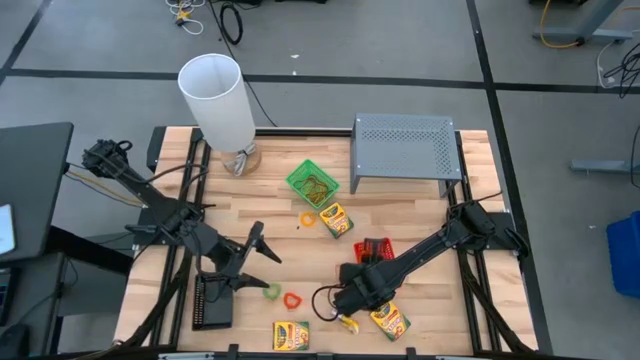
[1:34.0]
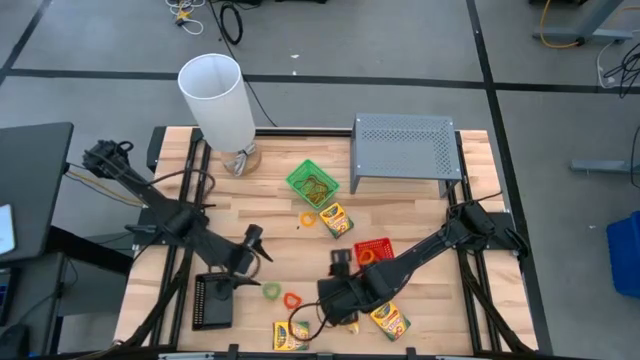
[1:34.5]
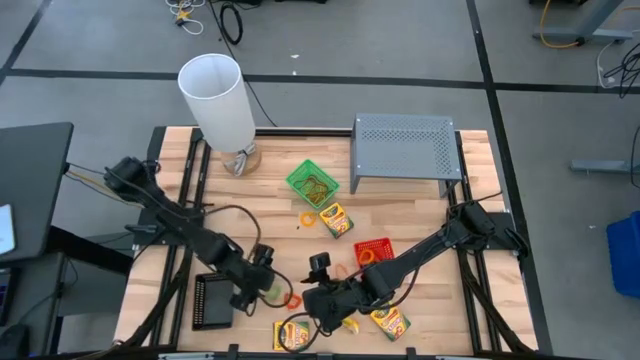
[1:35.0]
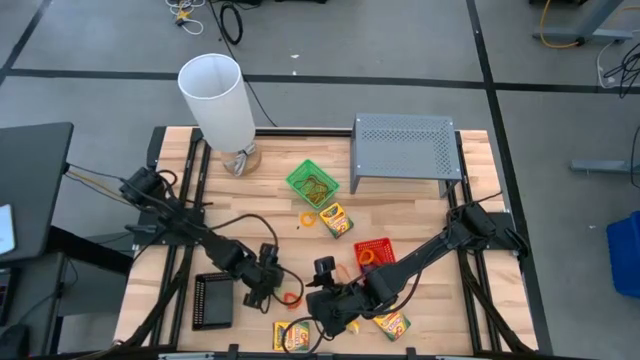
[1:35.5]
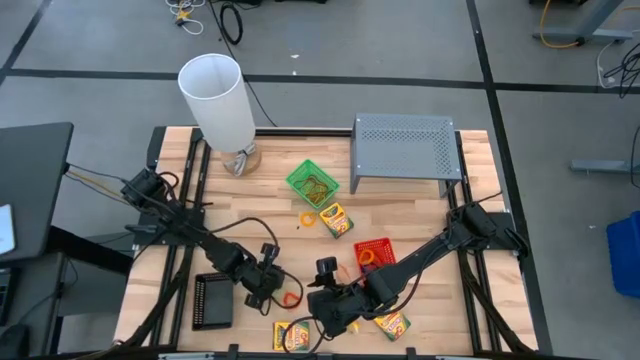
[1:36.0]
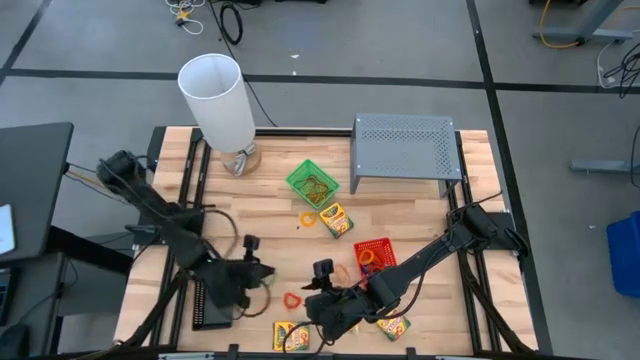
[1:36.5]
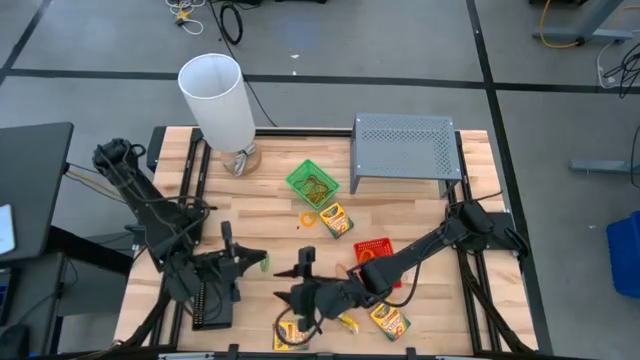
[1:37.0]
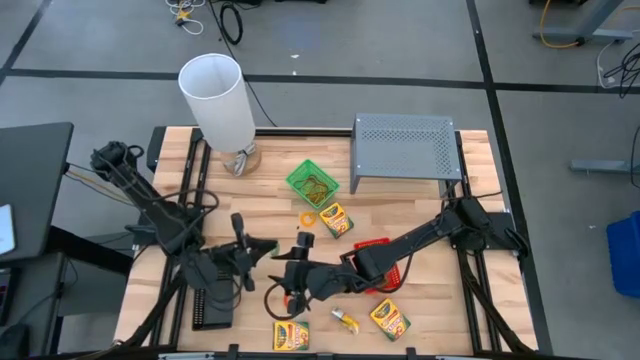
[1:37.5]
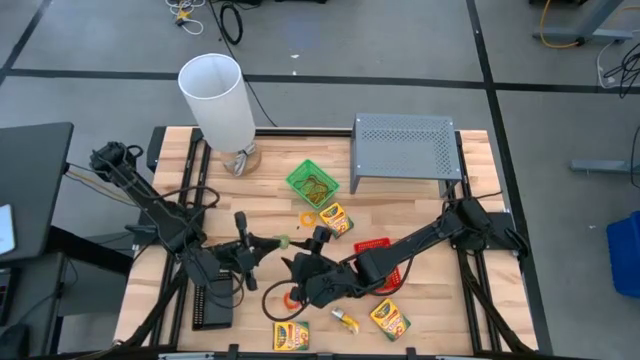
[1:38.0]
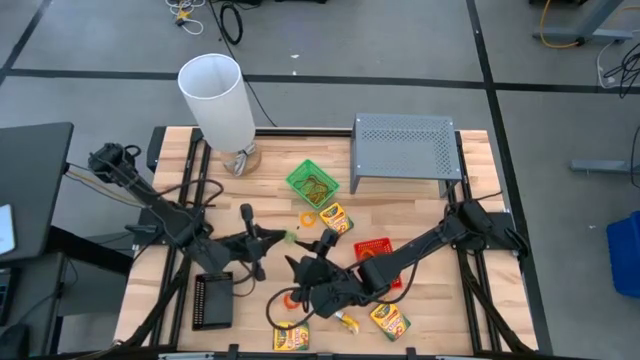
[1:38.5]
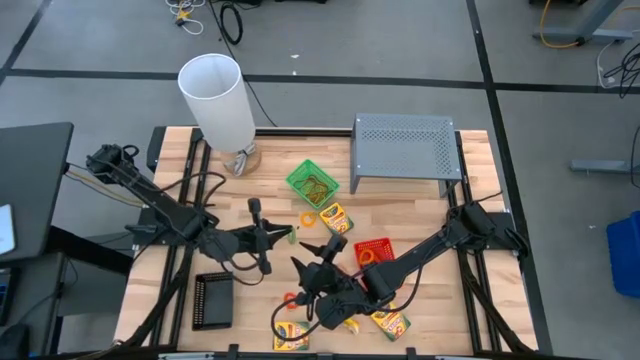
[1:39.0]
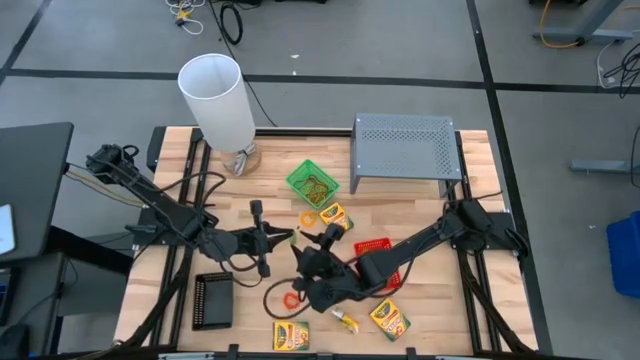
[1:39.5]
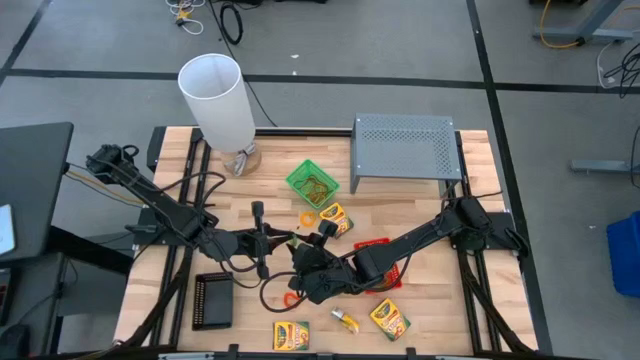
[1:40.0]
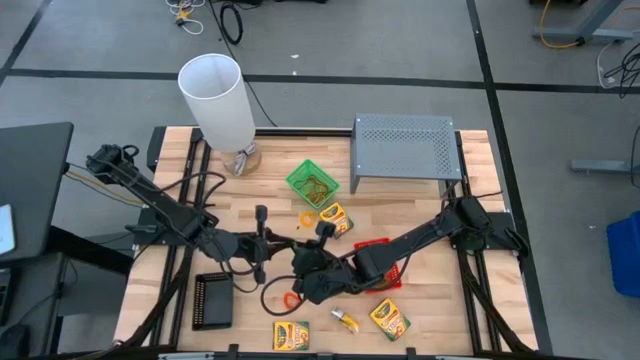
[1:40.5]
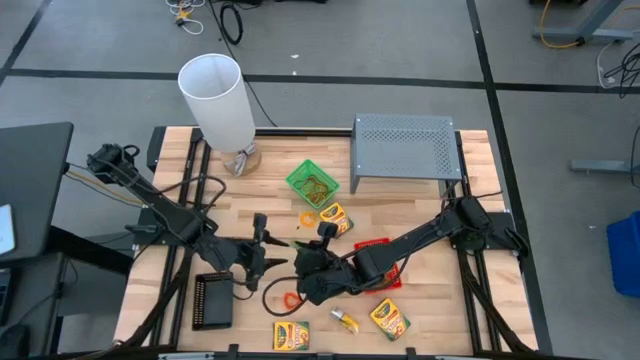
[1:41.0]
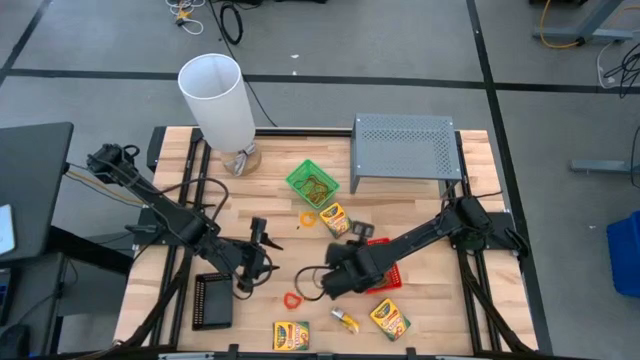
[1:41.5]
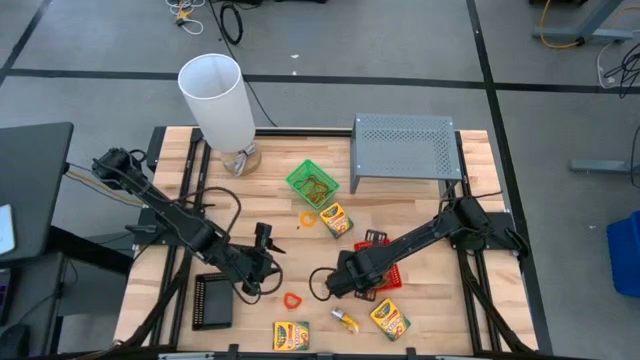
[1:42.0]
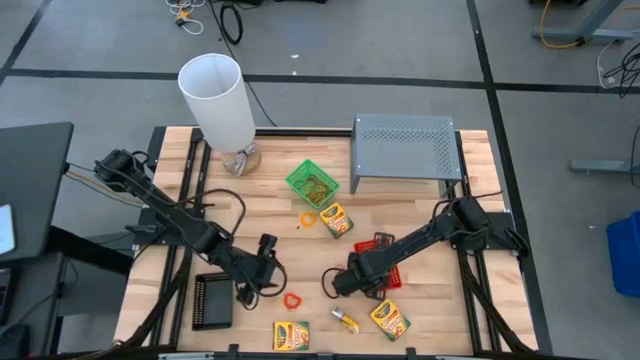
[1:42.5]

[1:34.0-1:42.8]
Task: Pick & Place Office Desk Supplies
Put the green spring keychain into the red bin

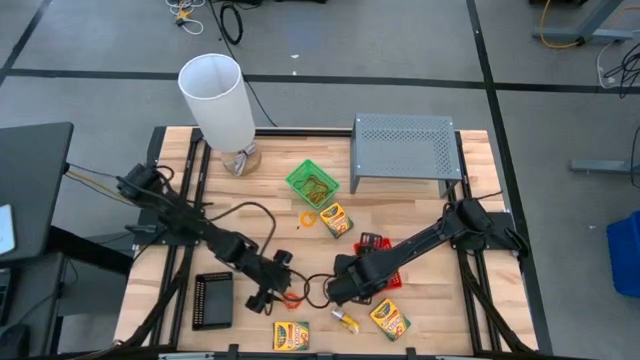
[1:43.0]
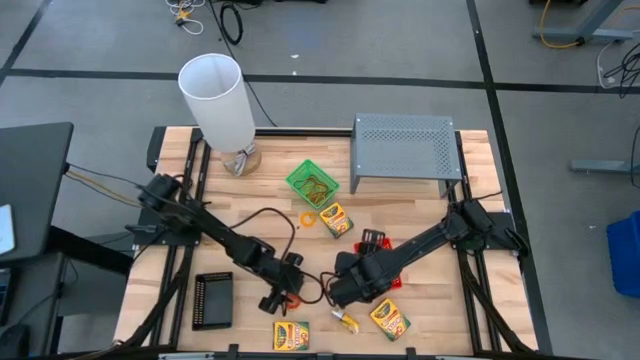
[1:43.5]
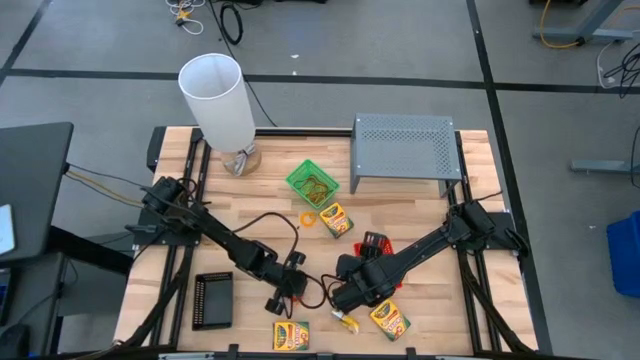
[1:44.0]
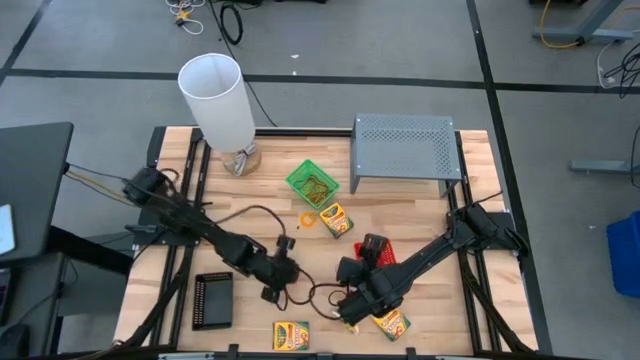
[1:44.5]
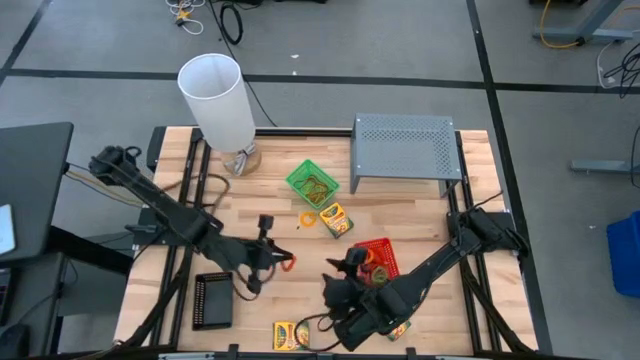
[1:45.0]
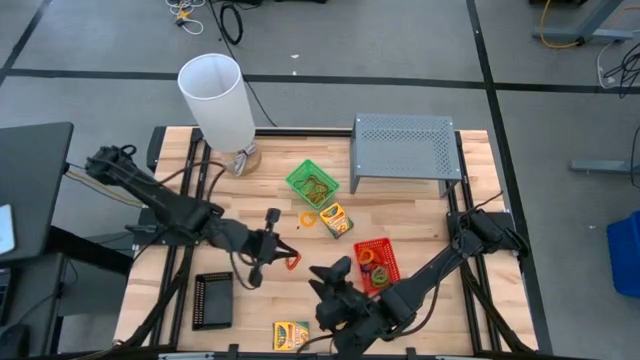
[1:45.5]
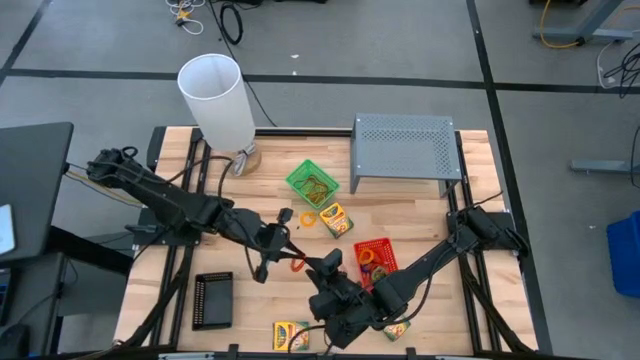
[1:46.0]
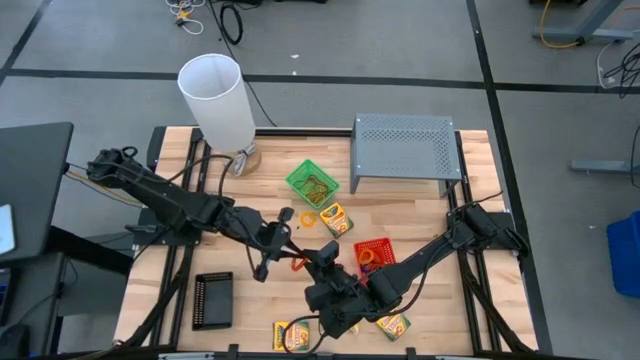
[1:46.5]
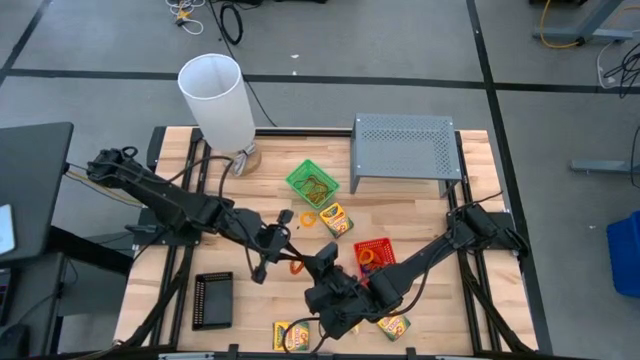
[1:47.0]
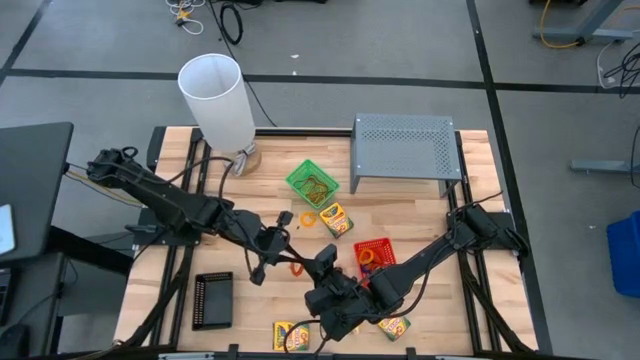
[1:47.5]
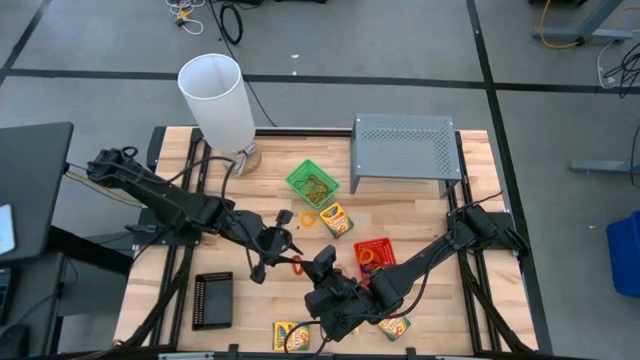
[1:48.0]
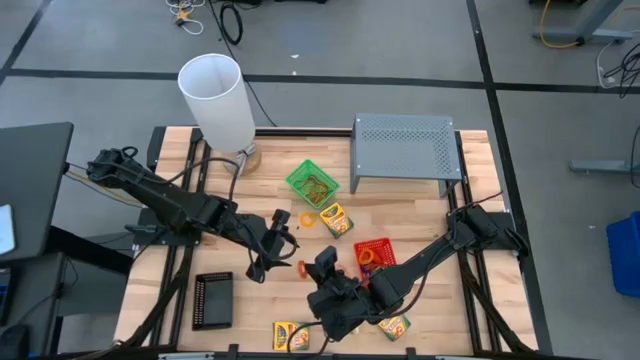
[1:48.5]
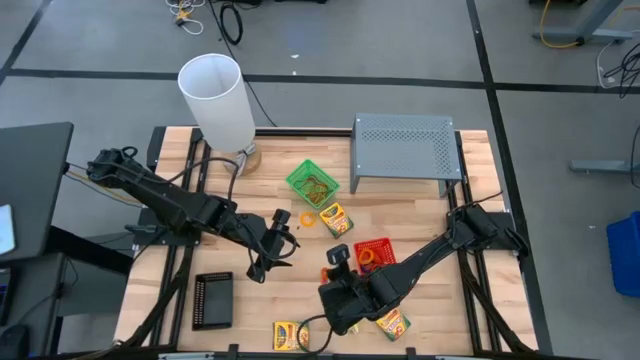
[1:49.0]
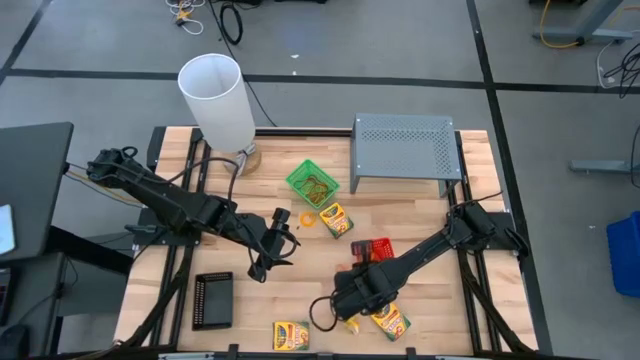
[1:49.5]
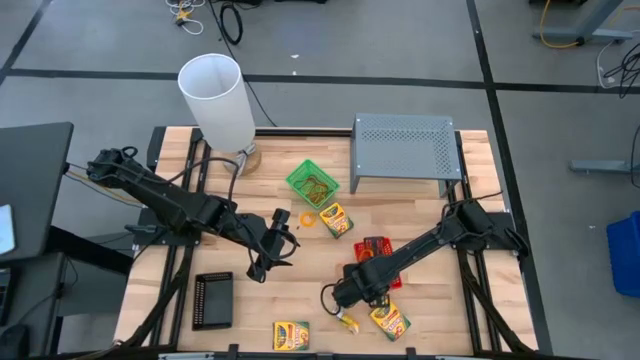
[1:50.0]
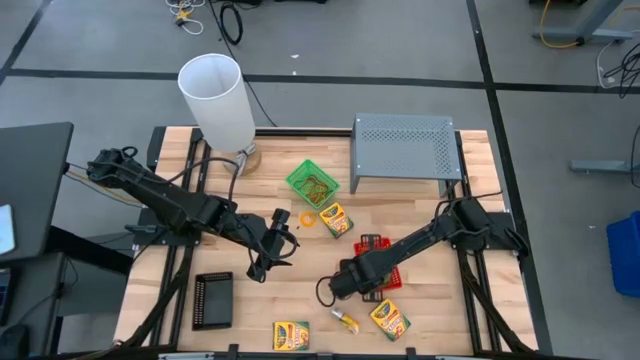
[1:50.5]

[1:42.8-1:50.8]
Put the orange spring keychain into the red bin

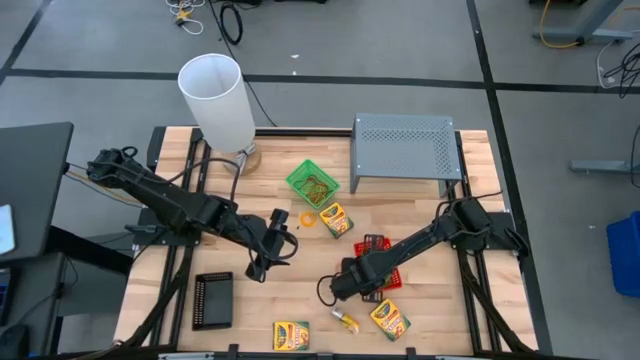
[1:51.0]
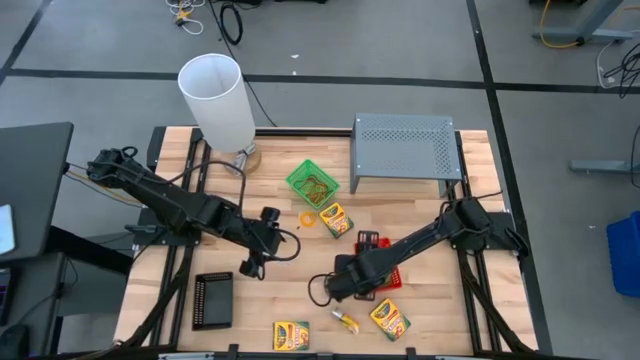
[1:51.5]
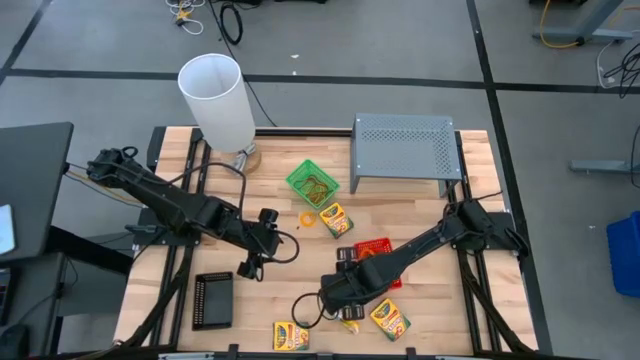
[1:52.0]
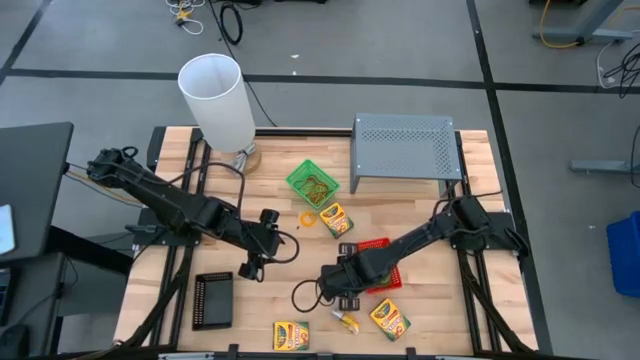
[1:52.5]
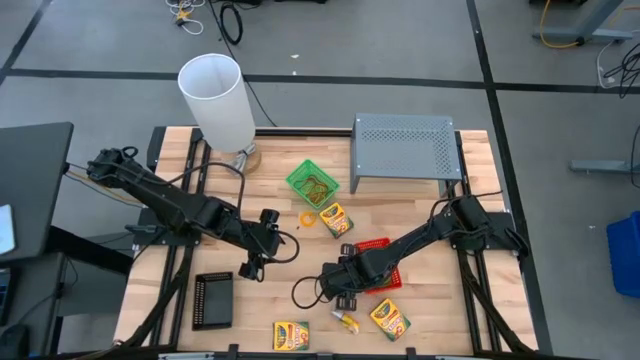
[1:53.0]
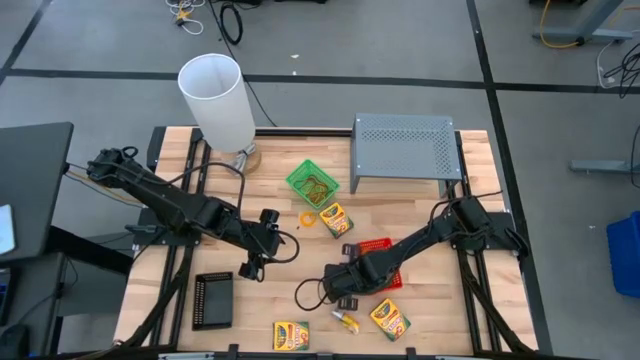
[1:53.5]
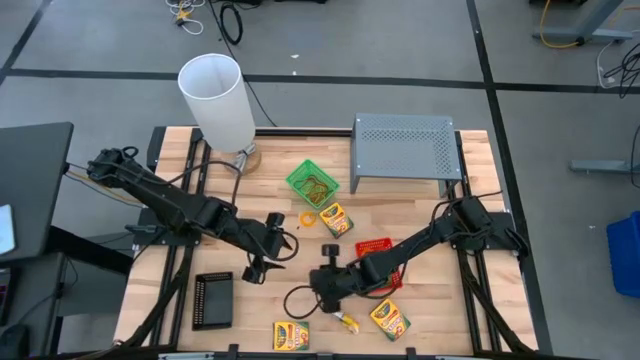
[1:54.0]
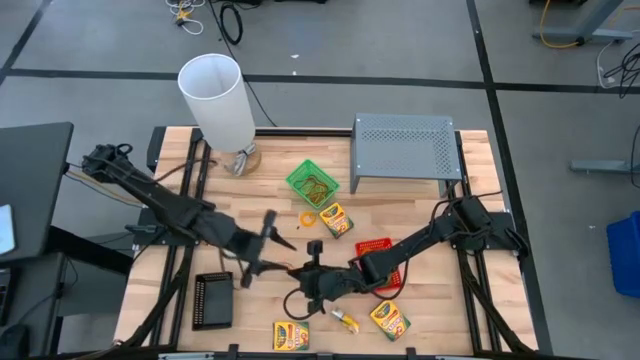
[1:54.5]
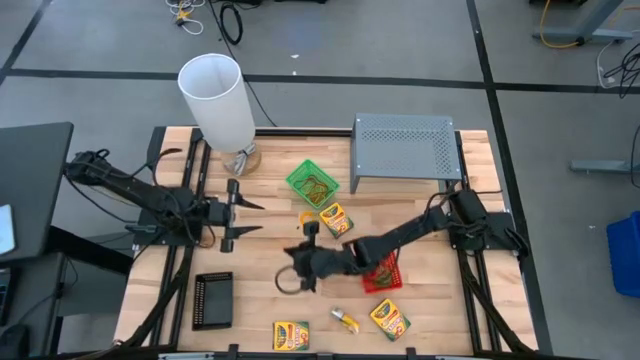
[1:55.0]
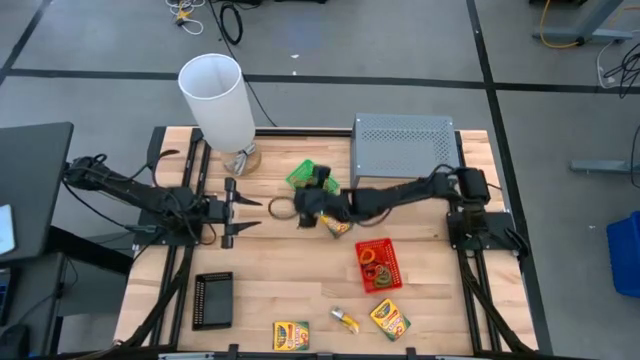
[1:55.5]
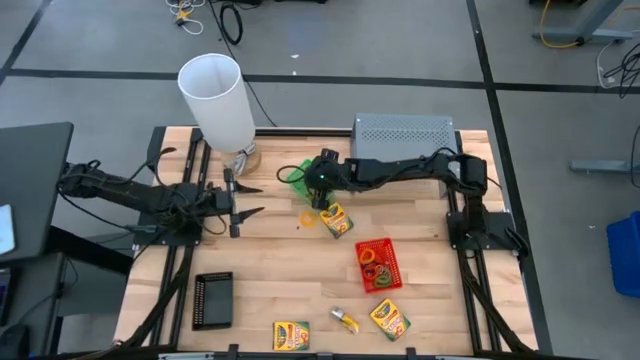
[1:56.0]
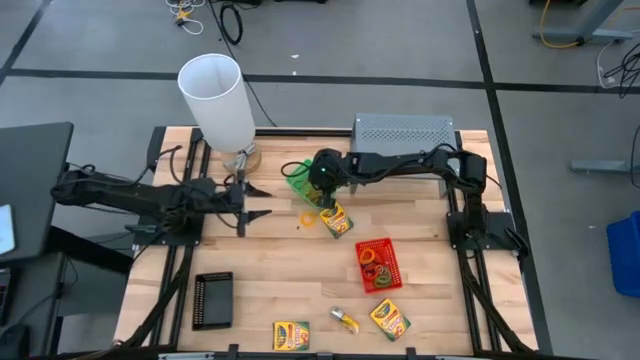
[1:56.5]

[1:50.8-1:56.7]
Put the orange rubber band into the green bin
